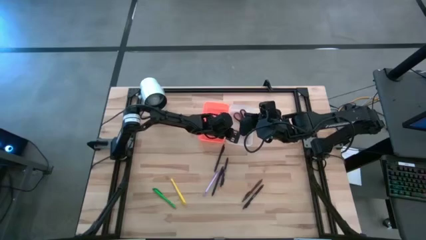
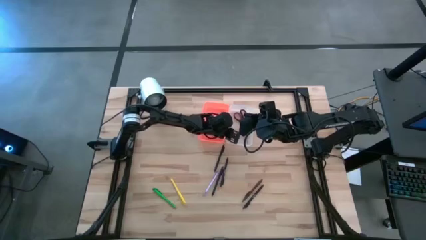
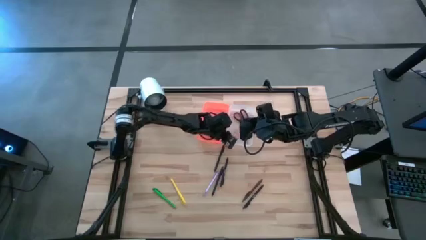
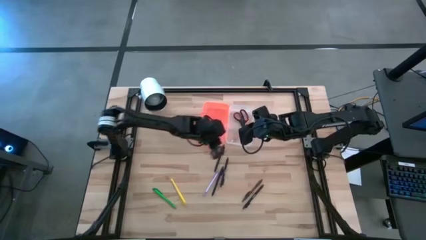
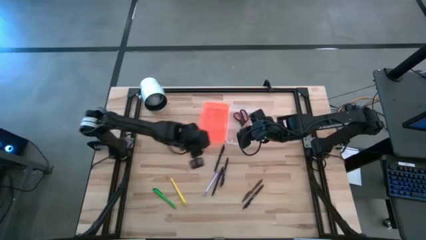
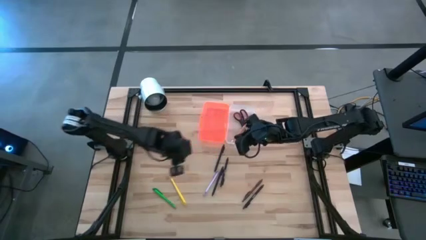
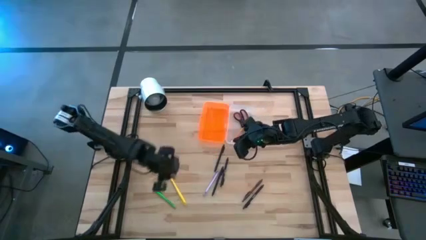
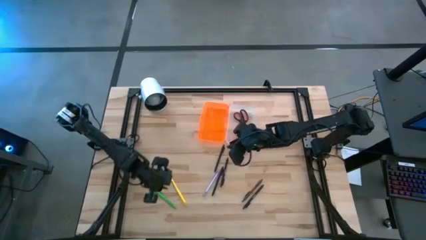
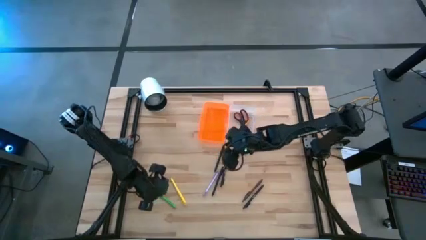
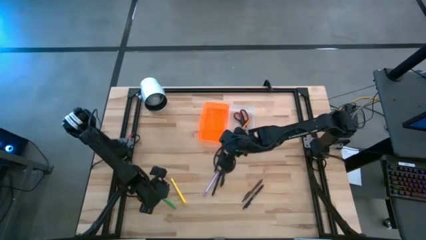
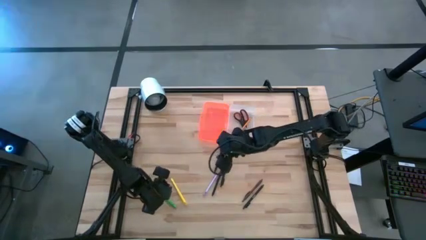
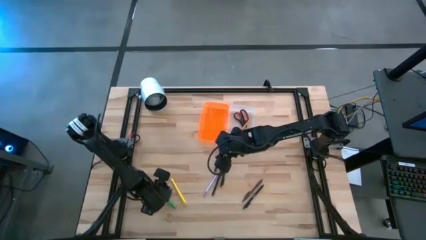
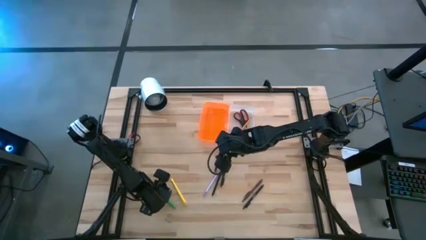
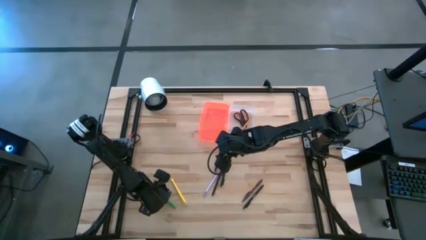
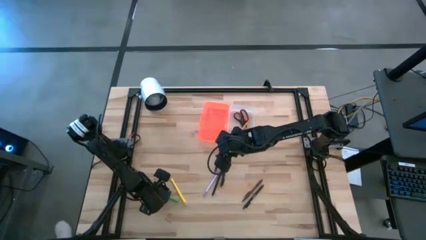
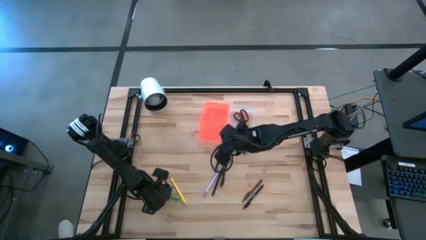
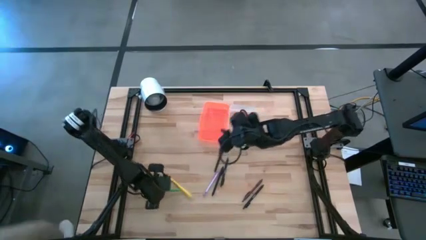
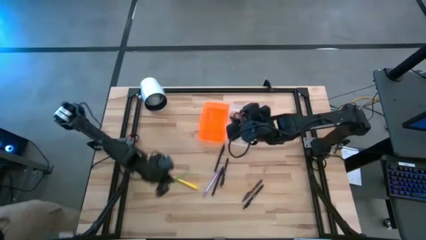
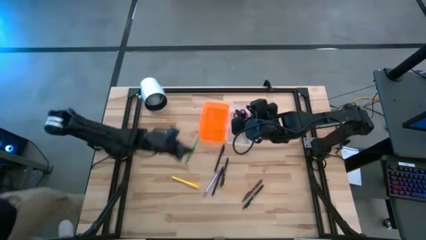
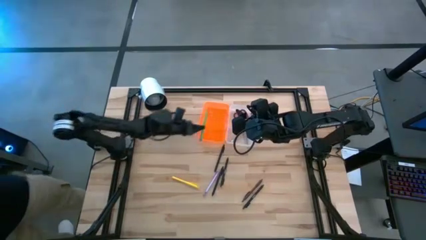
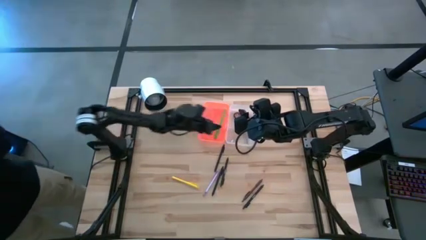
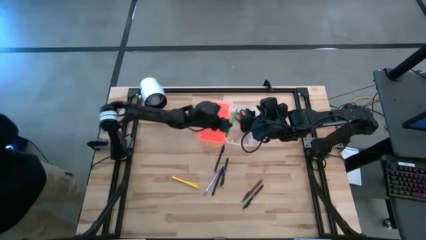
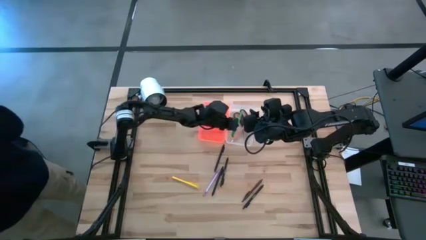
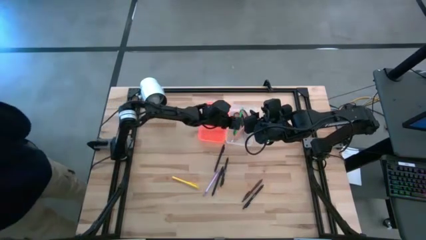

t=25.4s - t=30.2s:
Task: Pick & place school supplies into a supply box
Put the green pen into the orange supply box

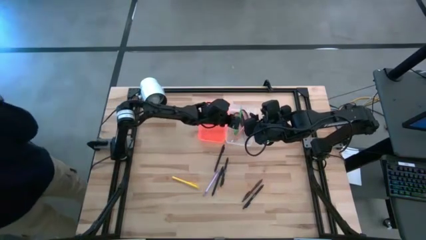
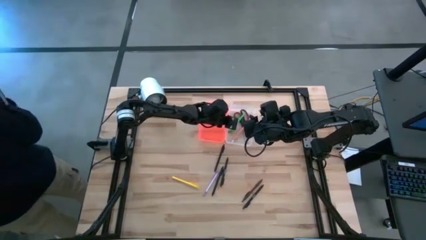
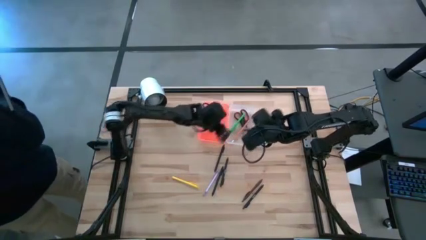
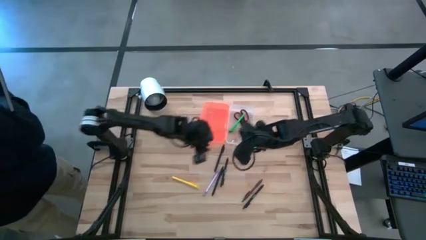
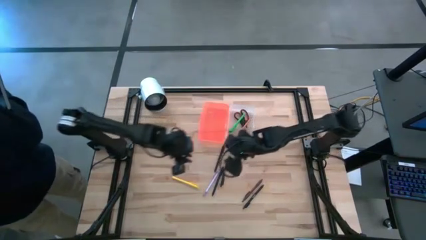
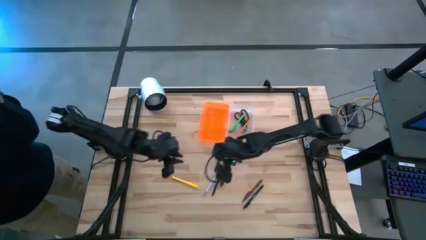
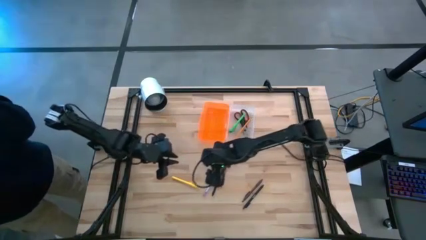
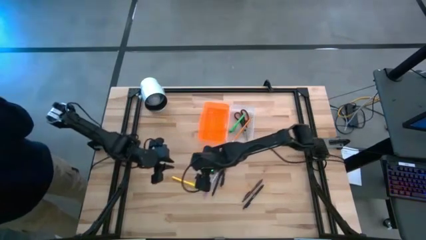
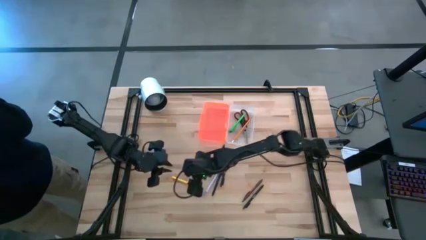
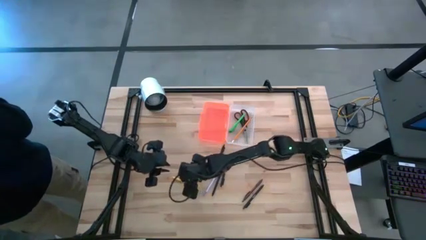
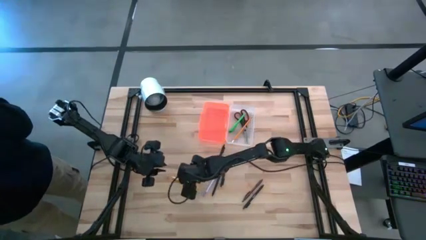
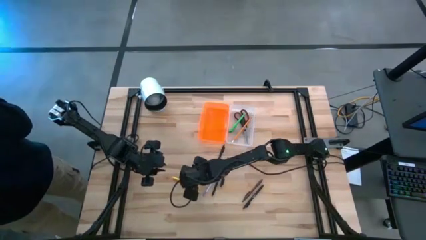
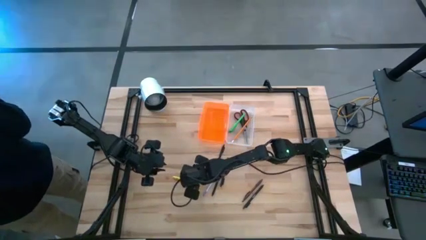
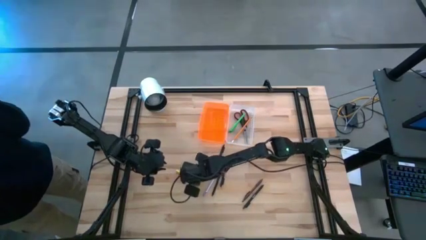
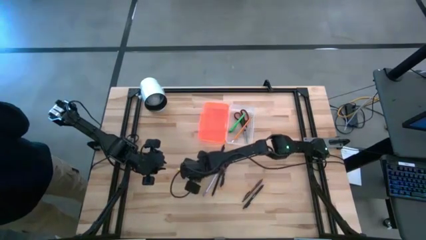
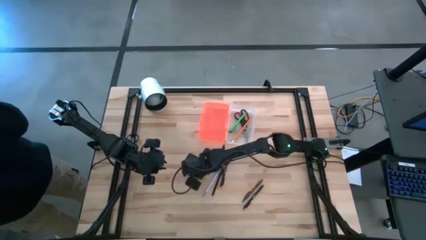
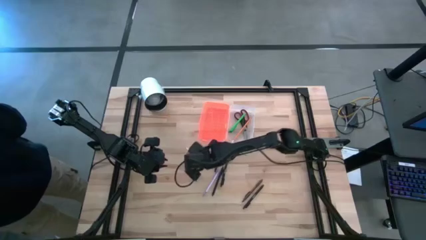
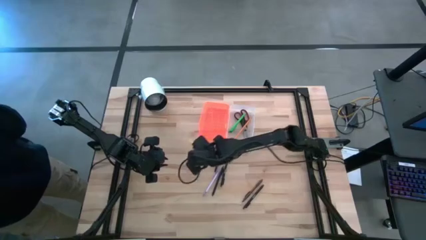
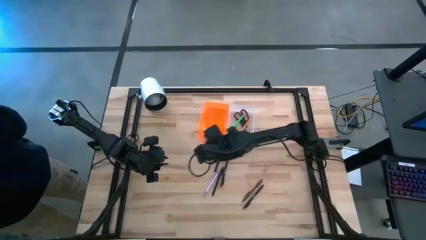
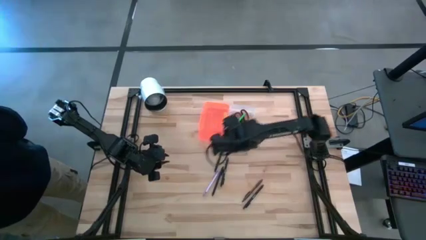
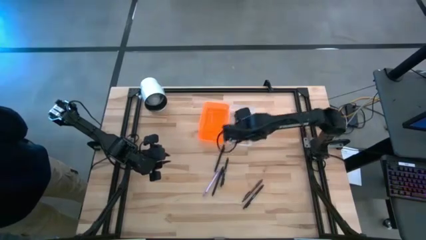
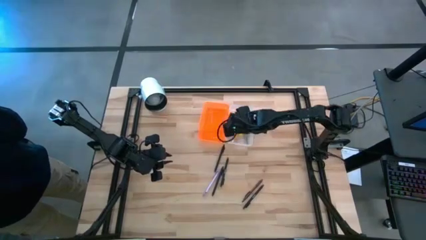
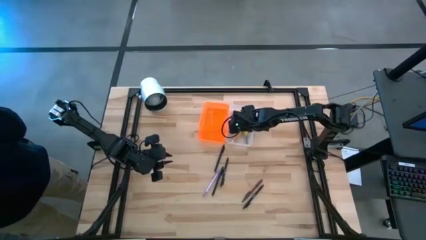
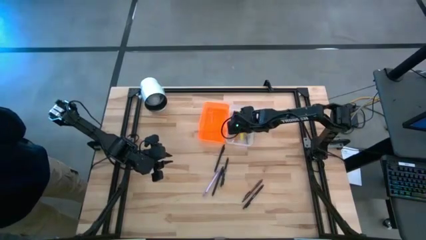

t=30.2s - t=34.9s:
Put the yellow pen into the orange supply box

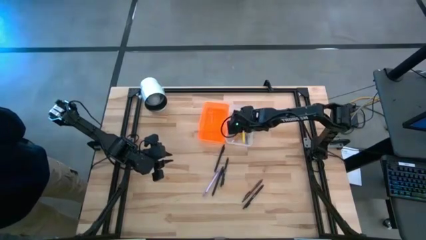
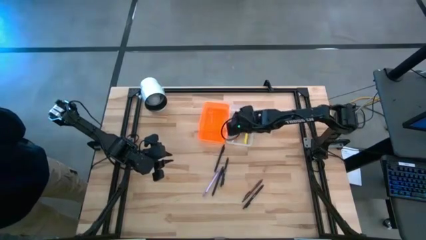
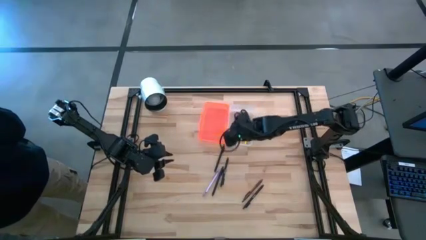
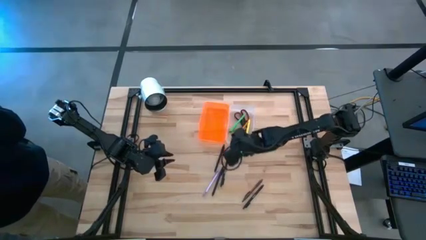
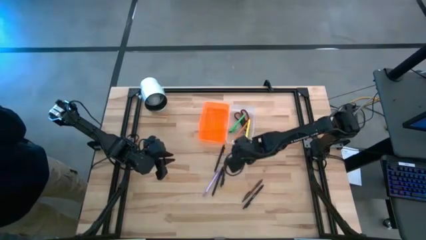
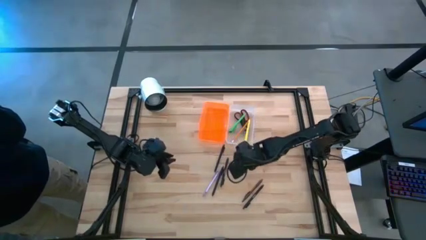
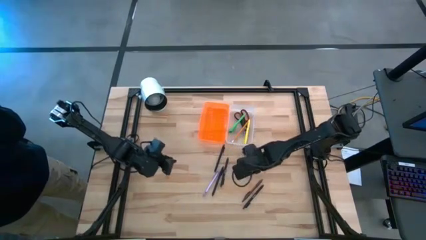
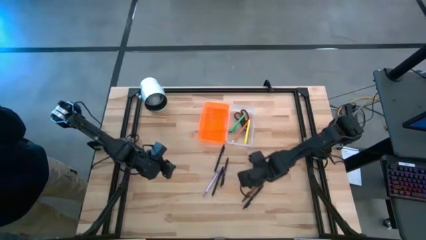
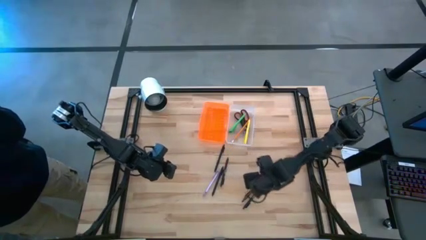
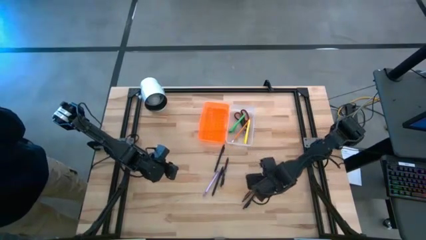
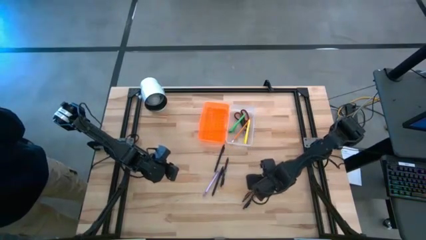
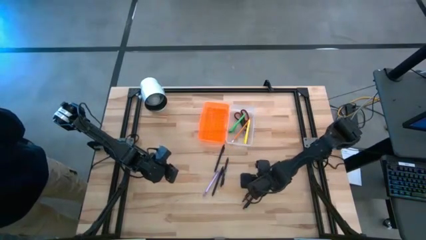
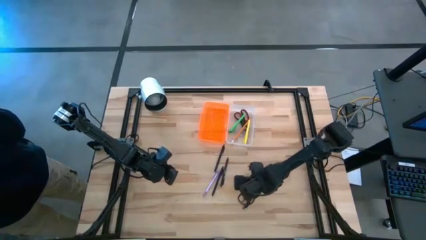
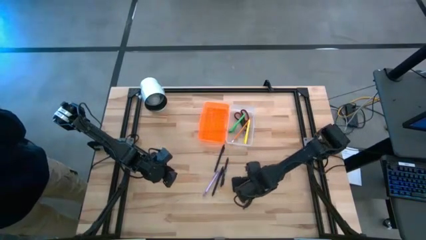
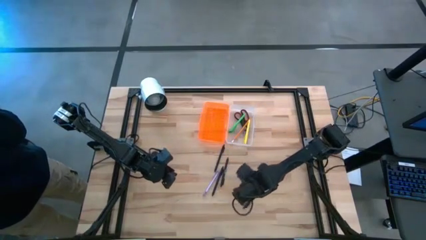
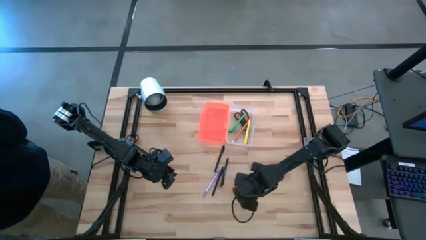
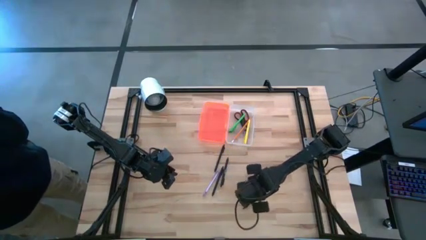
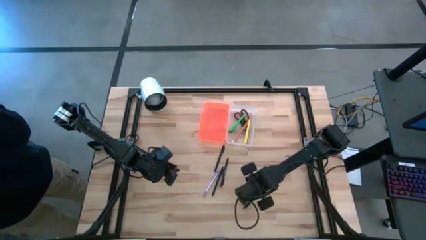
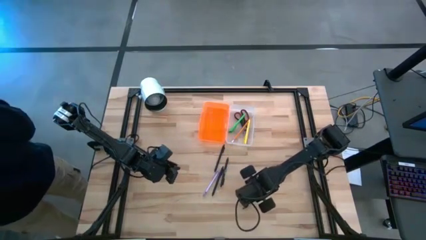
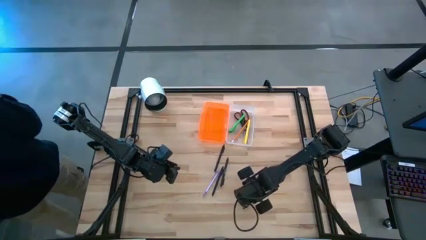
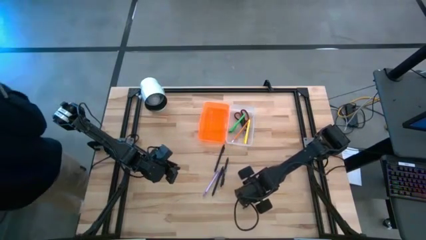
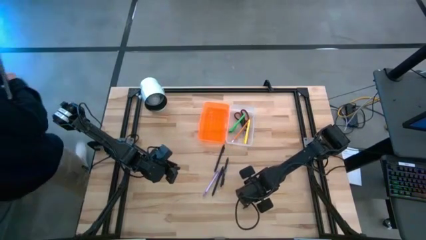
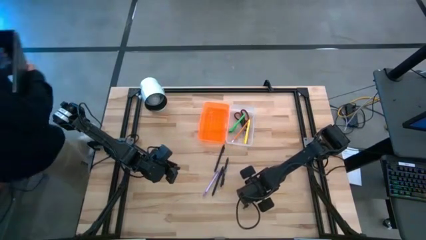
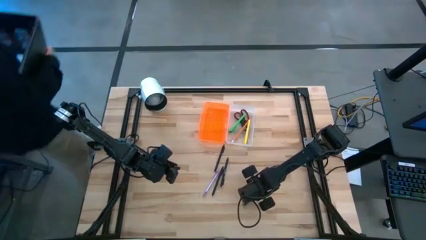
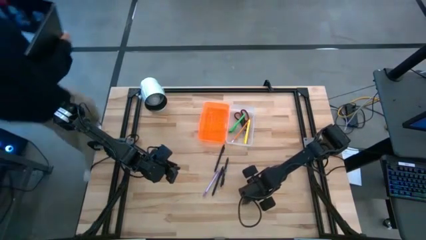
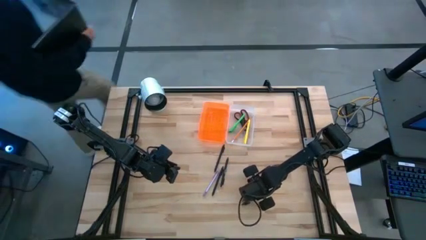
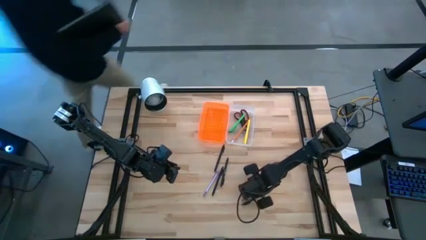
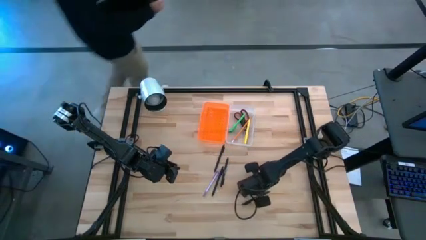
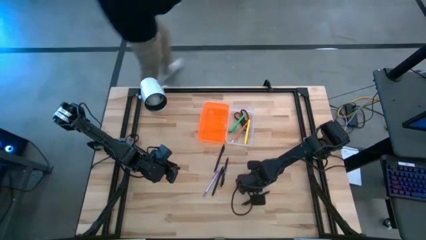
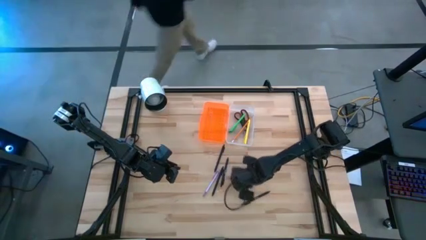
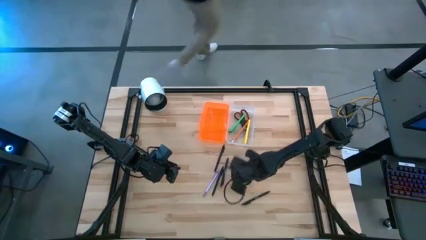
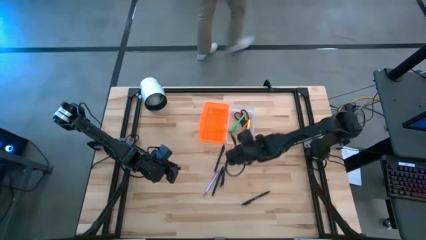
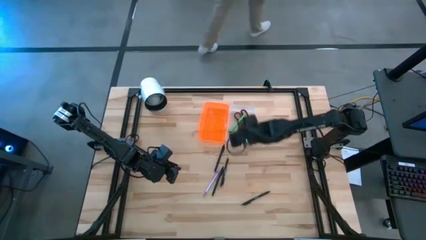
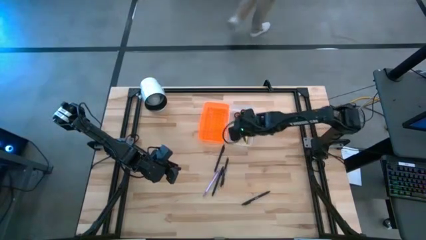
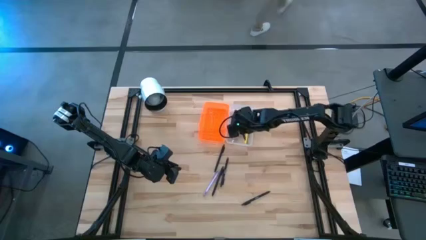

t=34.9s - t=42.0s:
Put the brown pen into the orange supply box
